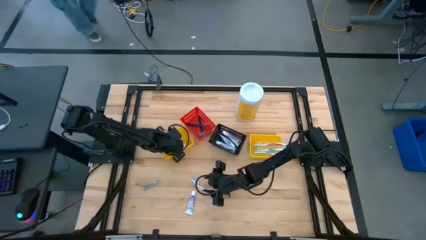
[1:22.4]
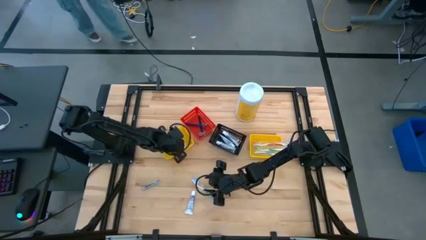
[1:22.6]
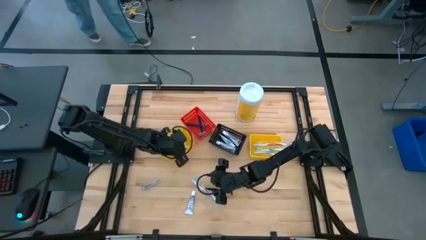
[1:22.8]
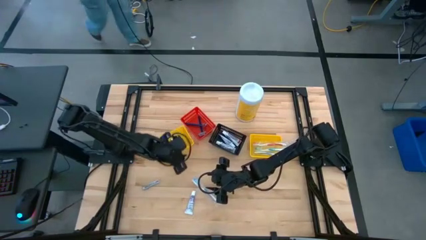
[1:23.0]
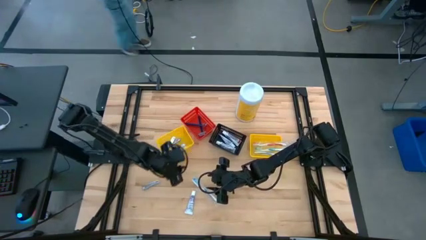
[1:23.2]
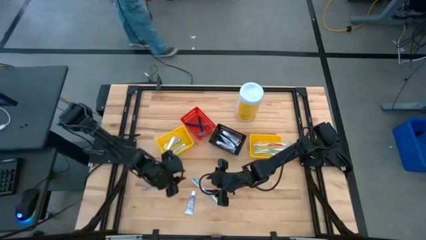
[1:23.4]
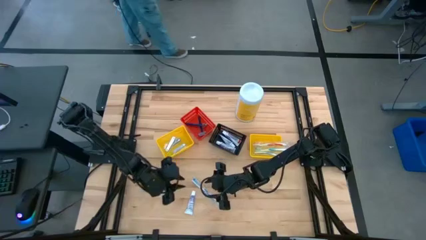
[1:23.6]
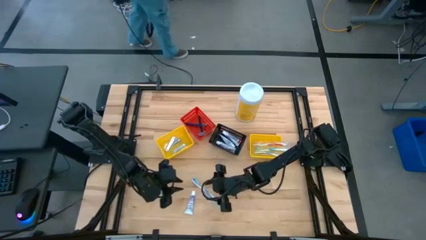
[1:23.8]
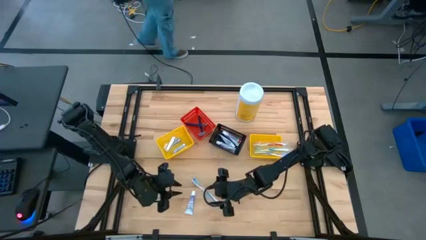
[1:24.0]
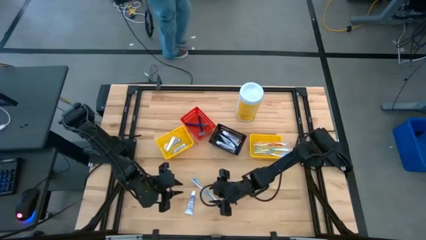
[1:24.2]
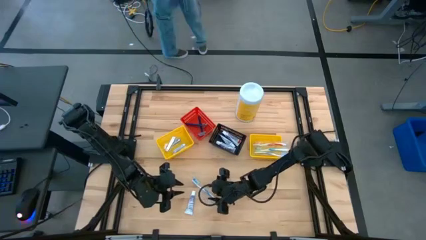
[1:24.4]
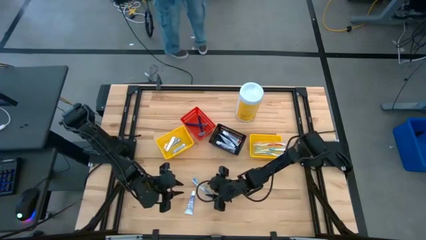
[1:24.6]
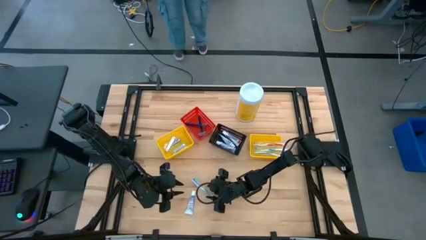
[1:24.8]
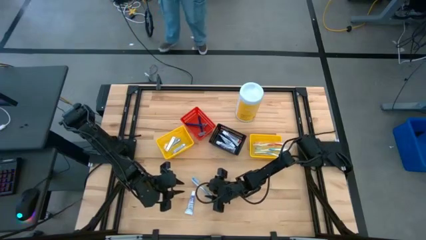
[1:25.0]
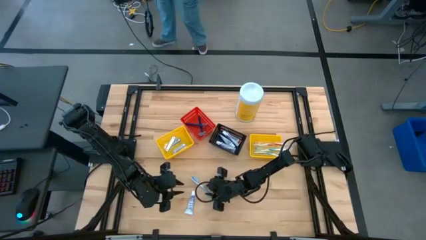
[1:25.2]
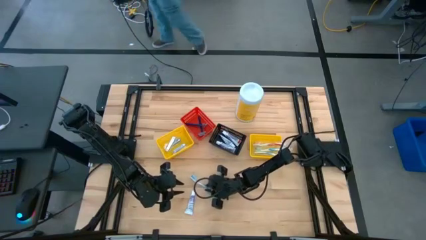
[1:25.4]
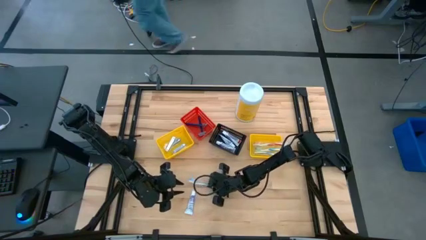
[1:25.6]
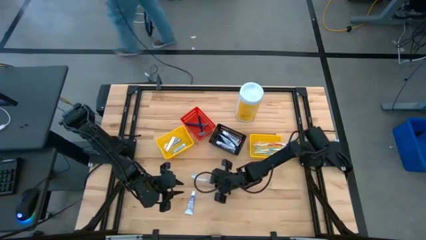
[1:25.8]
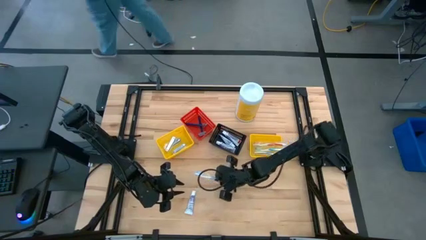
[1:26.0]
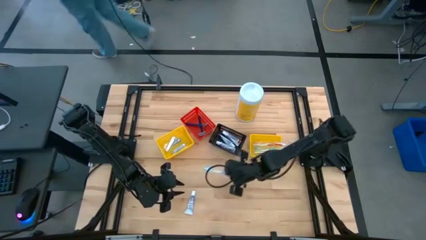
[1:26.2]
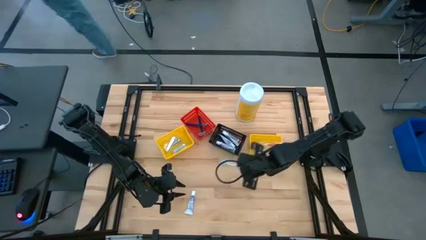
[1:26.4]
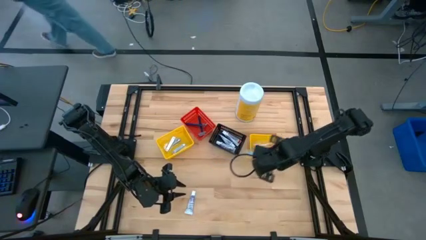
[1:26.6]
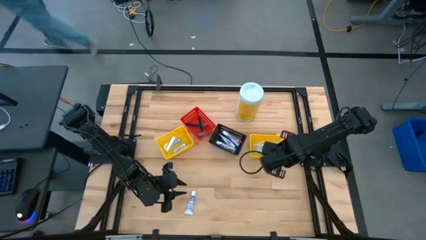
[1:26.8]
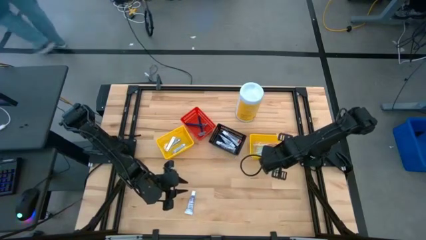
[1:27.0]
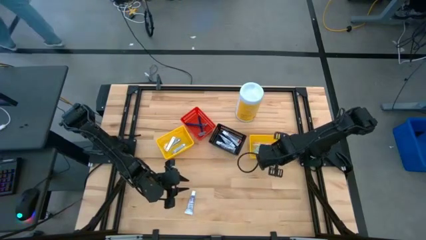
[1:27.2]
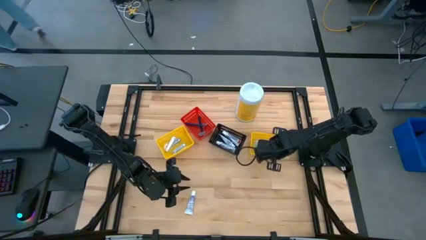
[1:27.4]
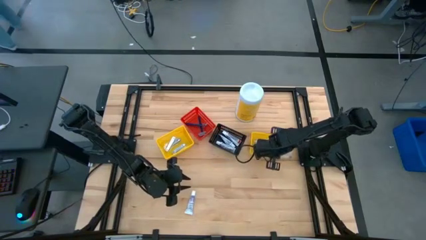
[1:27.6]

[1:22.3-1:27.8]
Task: Pick & Place Travel size toiletries
Put the toothbrush into the right yellow bin

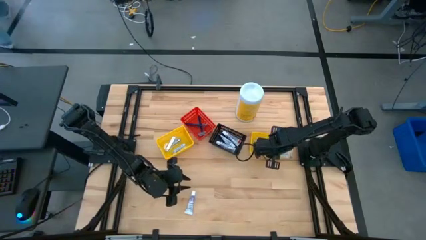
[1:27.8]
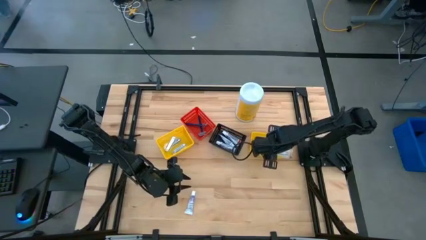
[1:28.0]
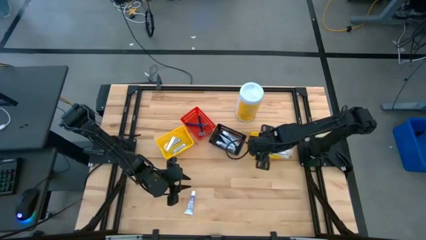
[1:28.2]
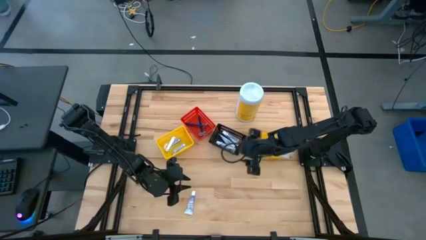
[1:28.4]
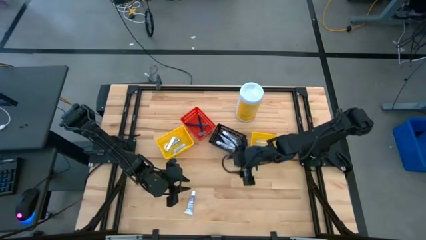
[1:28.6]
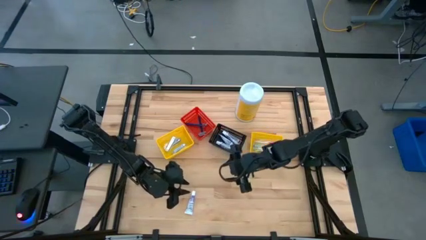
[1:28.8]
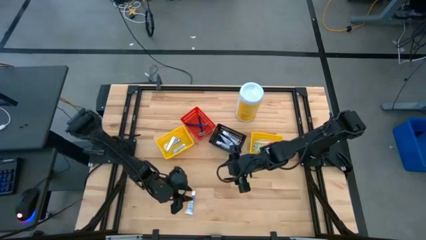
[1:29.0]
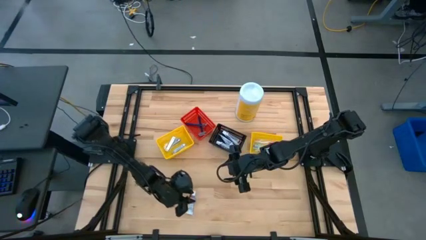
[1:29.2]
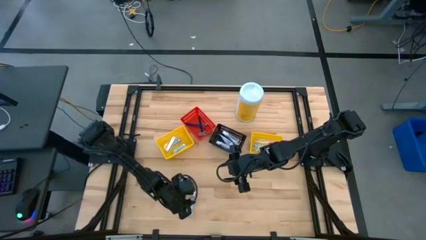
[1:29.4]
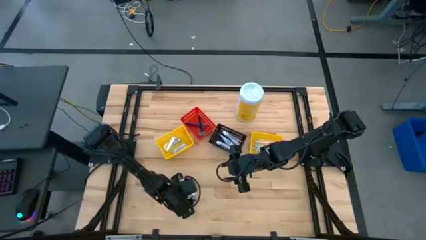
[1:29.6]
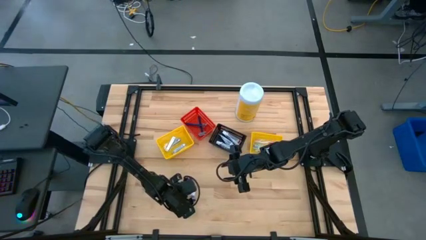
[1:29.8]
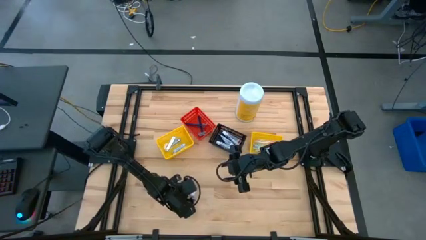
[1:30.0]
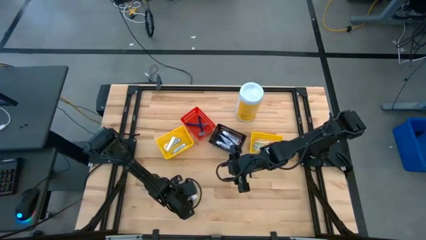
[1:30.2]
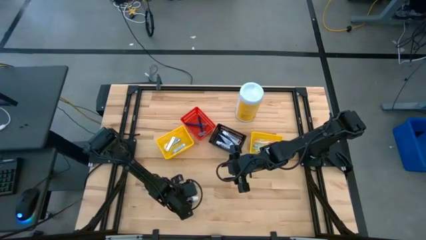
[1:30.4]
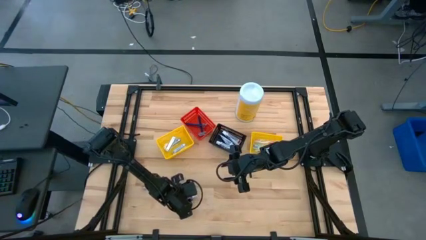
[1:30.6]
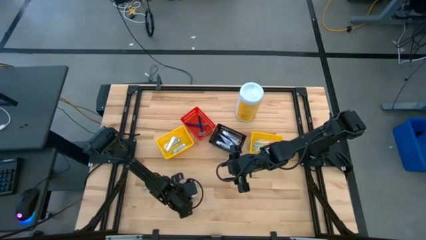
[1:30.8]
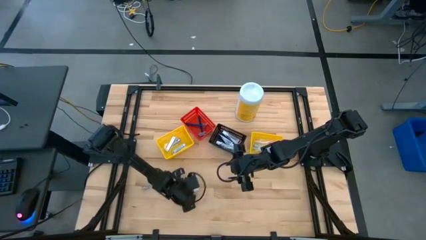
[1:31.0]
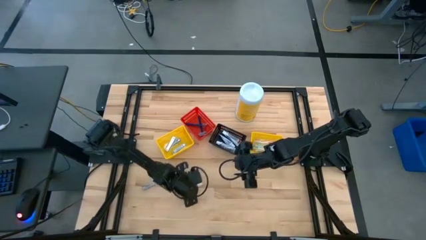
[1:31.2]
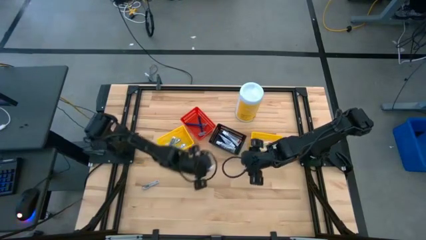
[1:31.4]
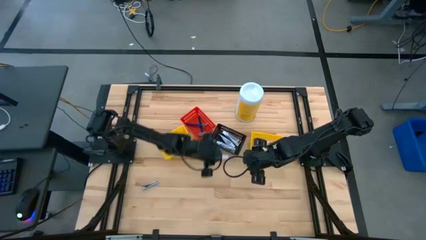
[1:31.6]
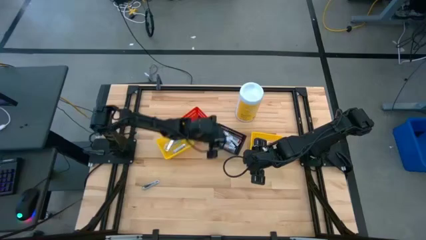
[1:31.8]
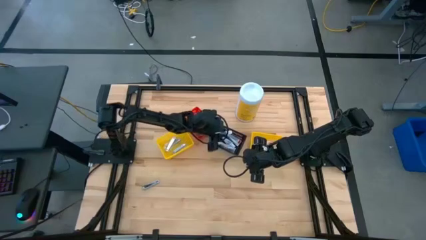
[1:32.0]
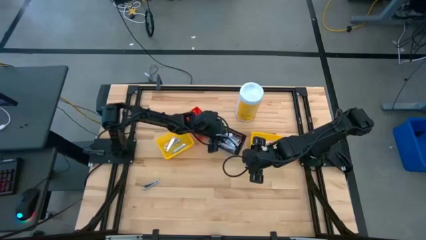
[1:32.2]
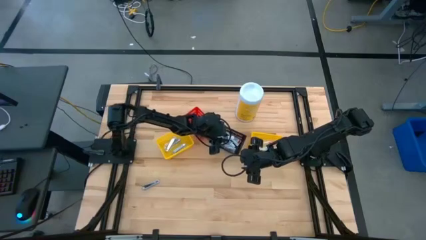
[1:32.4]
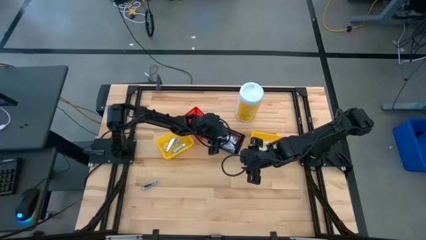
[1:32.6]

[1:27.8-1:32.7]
Put the toothpaste into the black bin

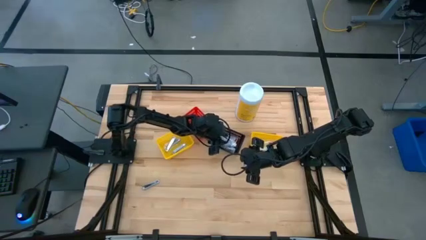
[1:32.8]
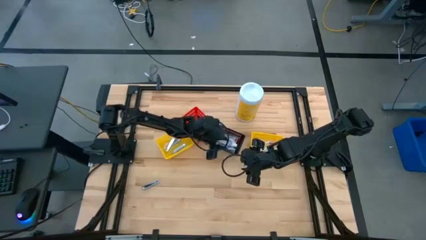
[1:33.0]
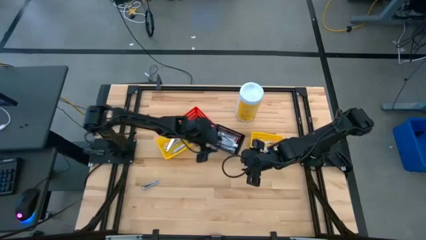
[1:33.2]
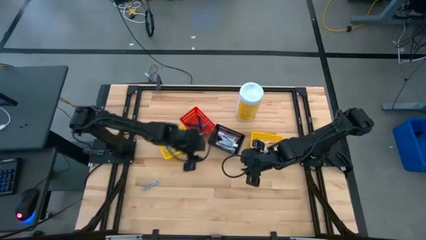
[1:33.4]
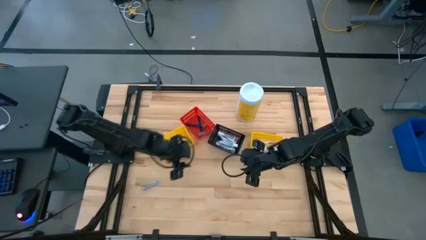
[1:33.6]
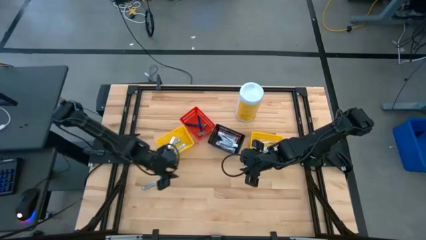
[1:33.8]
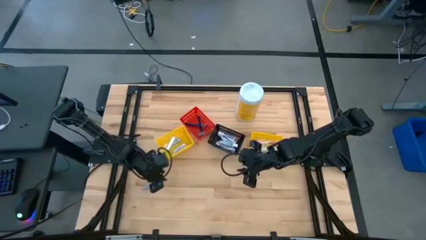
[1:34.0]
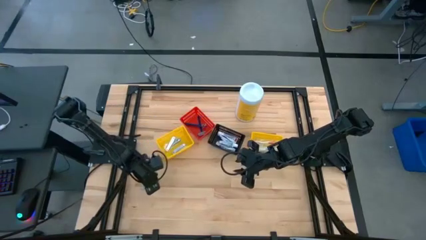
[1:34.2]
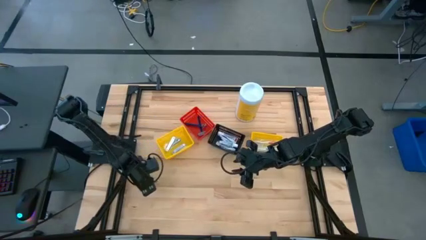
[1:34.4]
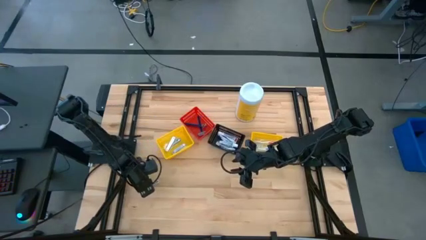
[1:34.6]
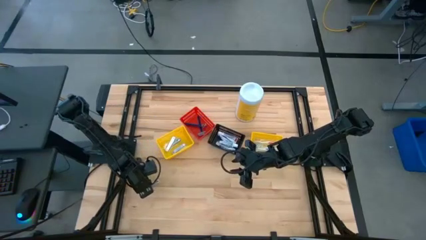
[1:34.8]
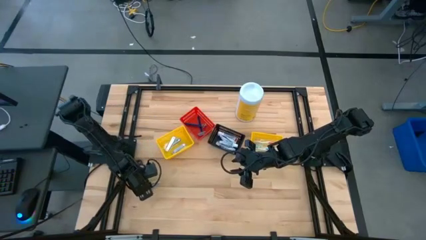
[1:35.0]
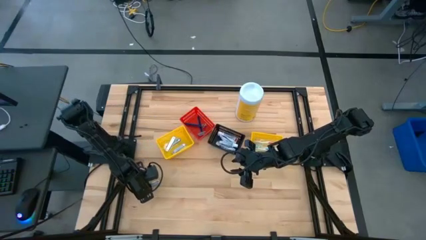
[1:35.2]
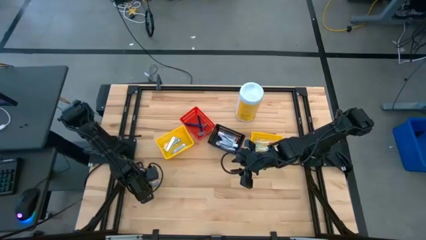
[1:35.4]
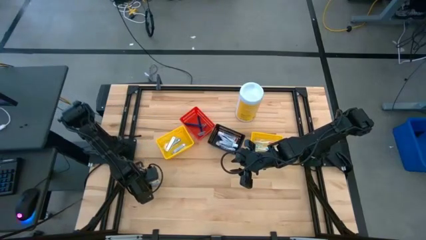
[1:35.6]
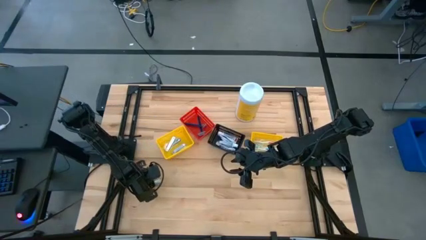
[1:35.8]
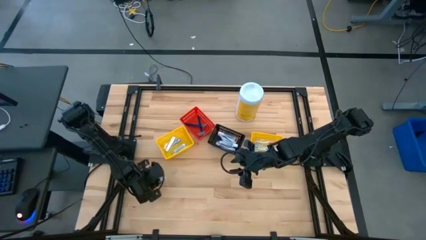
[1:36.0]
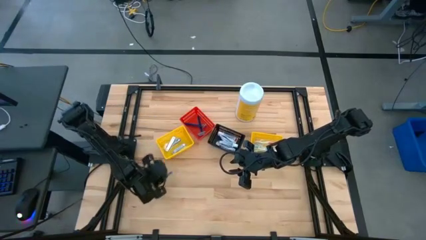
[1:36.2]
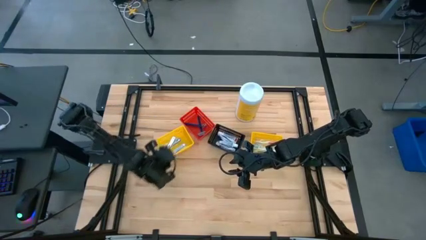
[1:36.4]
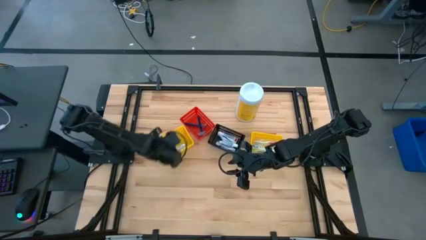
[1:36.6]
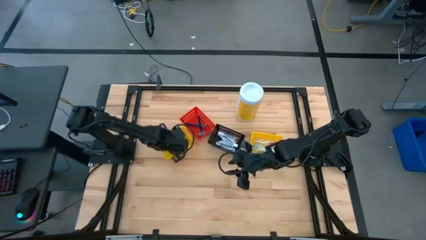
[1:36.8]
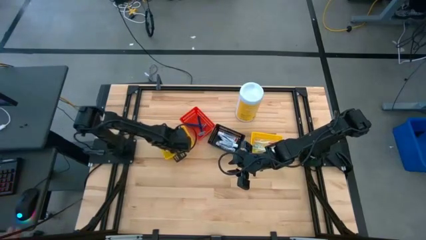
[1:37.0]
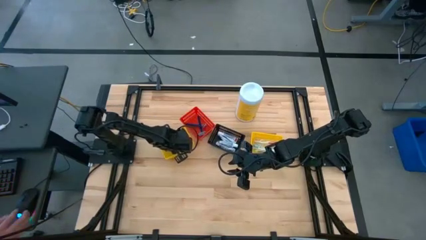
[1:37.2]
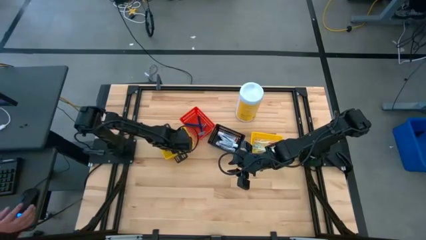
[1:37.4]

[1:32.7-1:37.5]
Put the nail cutter into the left yellow bin

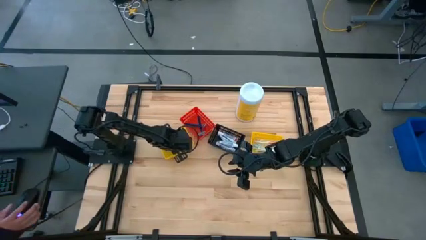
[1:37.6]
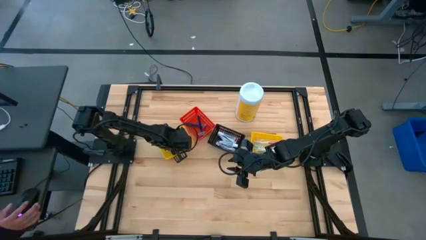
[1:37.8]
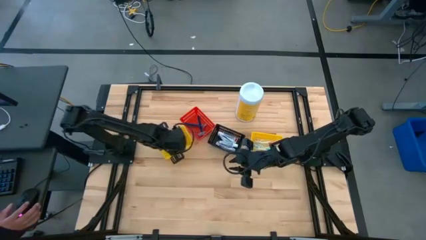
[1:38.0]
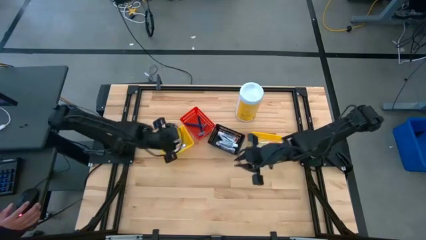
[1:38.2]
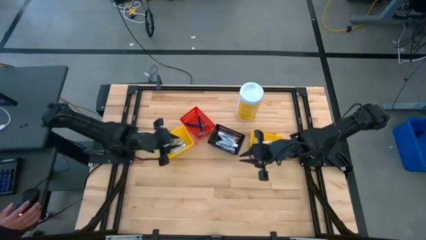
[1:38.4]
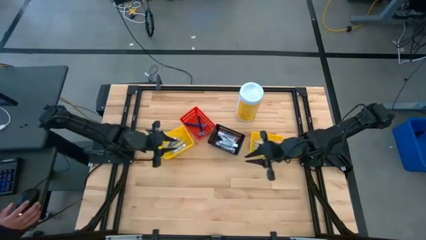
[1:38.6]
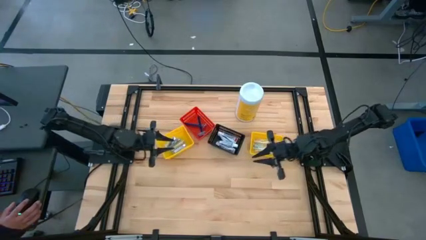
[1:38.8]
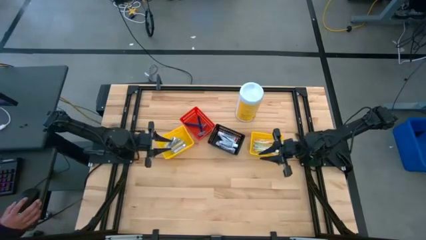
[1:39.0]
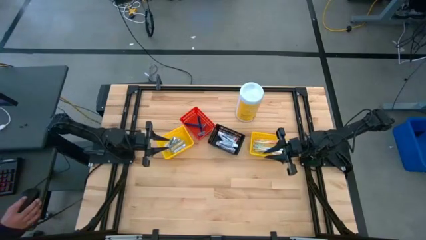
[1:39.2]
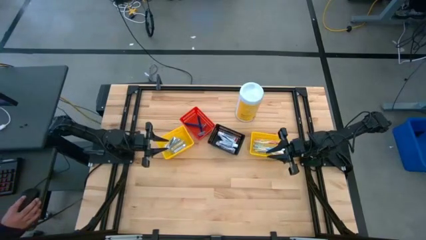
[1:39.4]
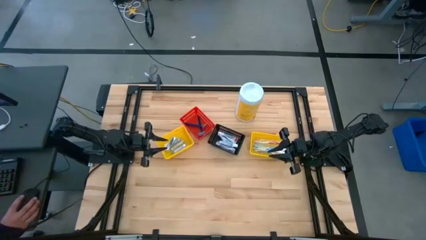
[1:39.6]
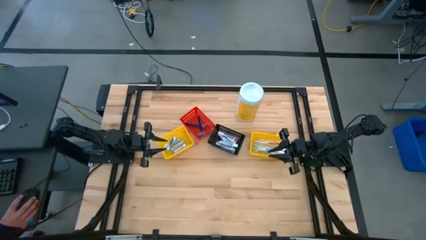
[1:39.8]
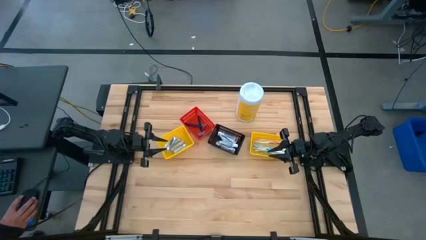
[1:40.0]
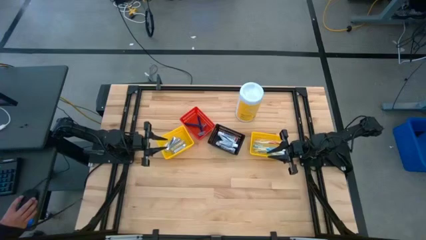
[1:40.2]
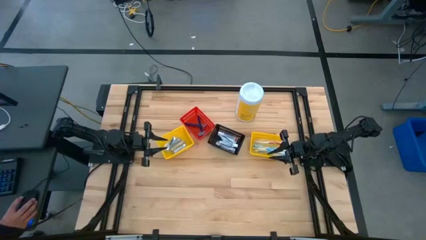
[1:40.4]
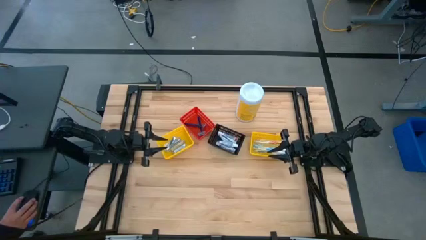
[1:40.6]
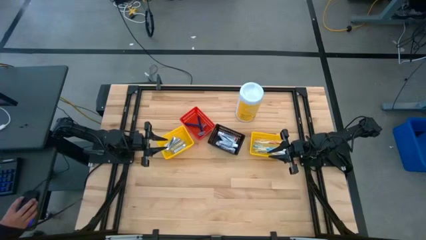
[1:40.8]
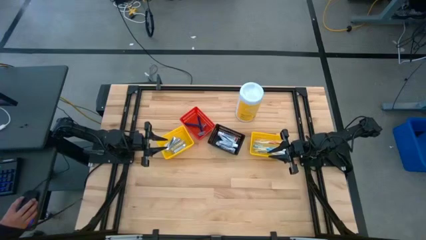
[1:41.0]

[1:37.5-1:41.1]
Return to Home Position
